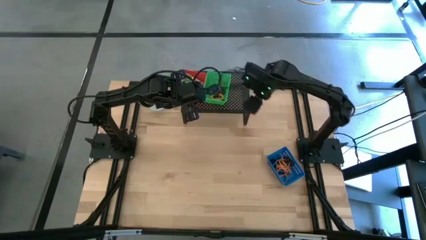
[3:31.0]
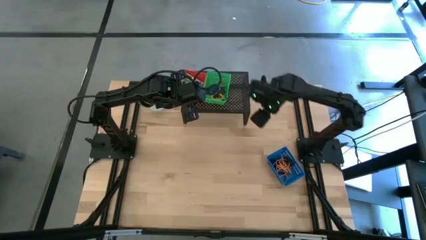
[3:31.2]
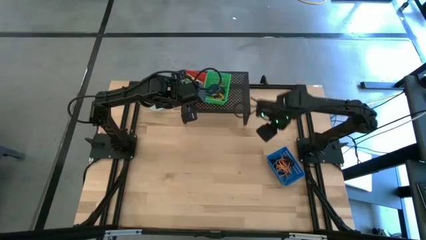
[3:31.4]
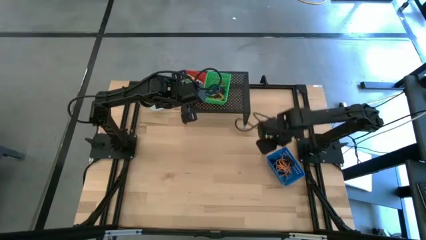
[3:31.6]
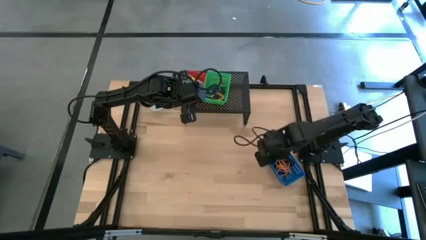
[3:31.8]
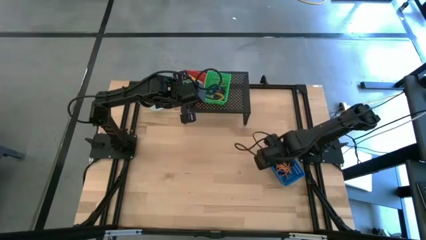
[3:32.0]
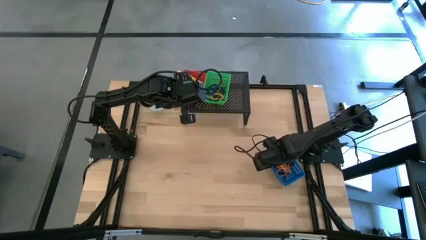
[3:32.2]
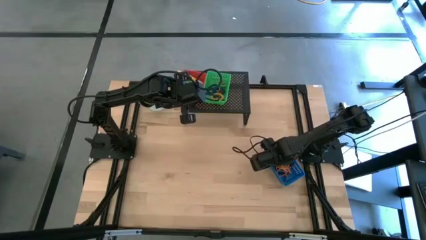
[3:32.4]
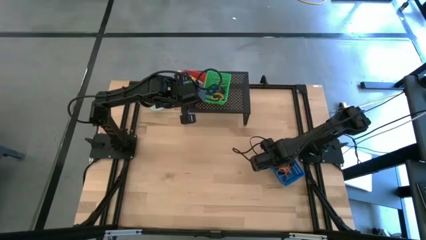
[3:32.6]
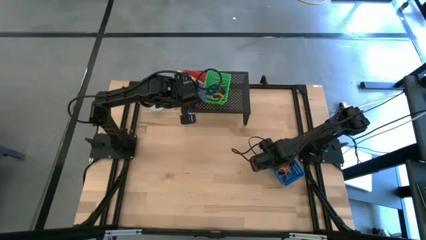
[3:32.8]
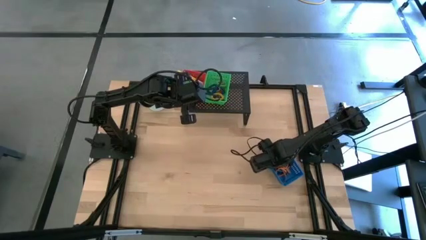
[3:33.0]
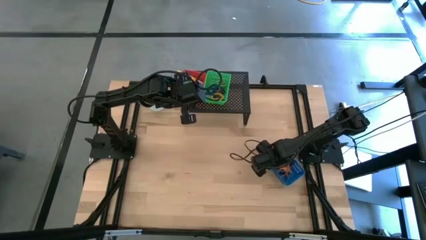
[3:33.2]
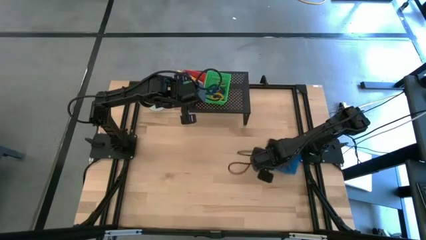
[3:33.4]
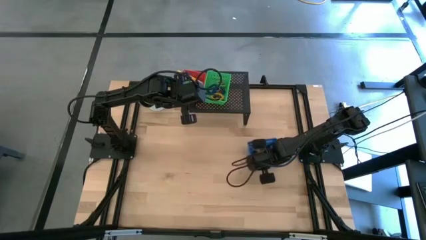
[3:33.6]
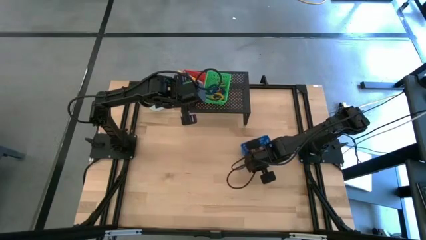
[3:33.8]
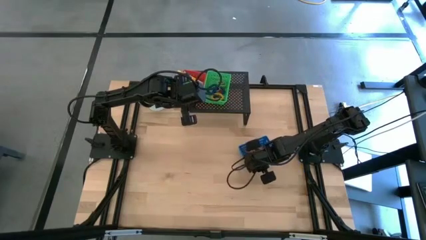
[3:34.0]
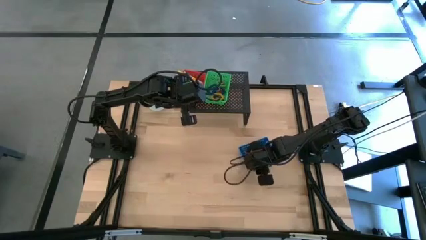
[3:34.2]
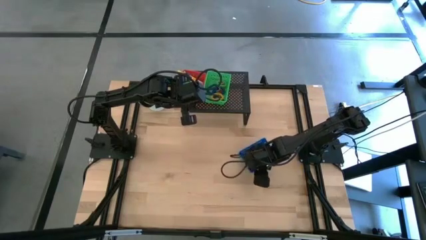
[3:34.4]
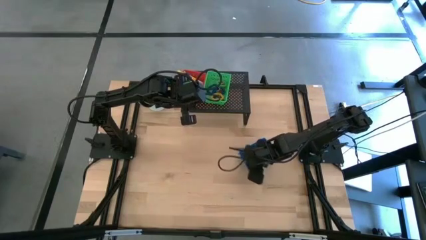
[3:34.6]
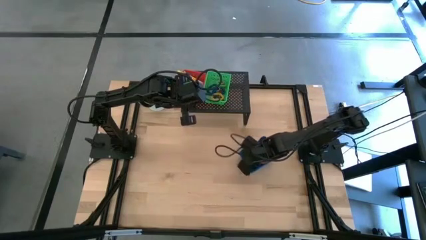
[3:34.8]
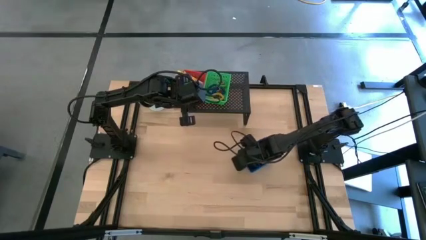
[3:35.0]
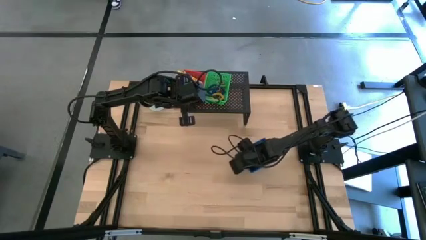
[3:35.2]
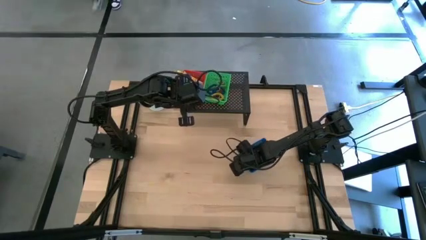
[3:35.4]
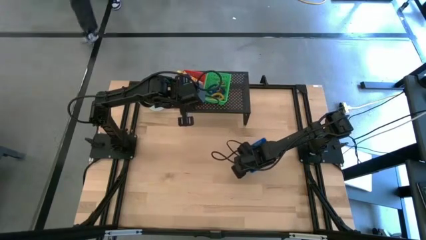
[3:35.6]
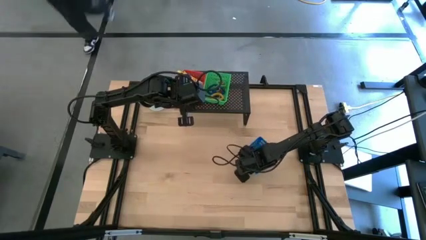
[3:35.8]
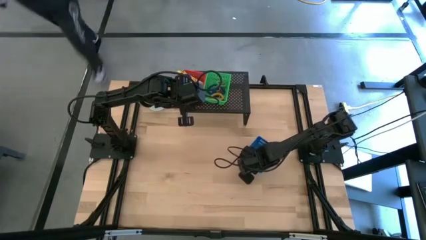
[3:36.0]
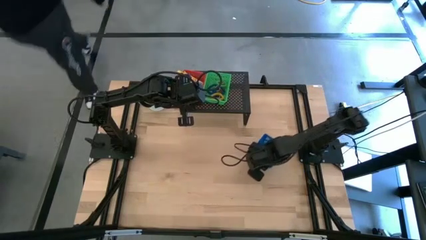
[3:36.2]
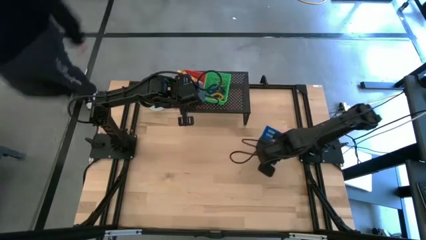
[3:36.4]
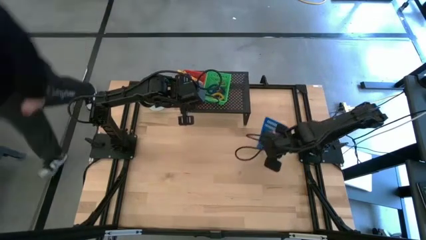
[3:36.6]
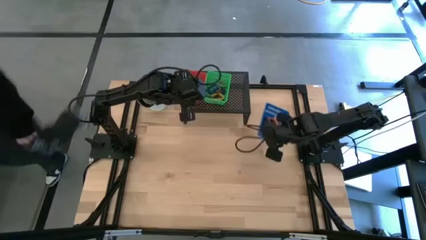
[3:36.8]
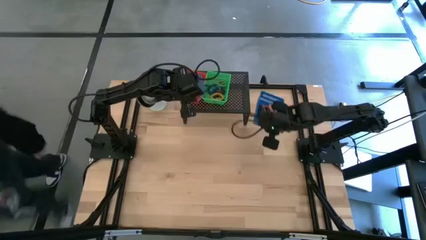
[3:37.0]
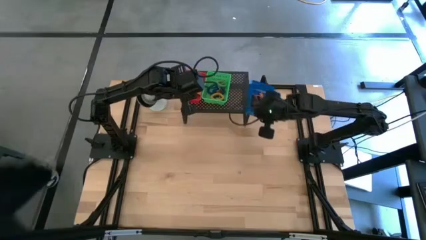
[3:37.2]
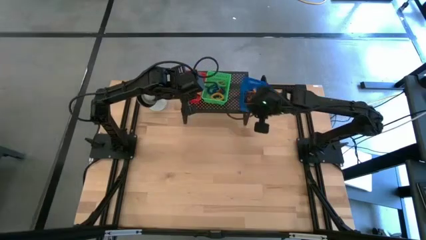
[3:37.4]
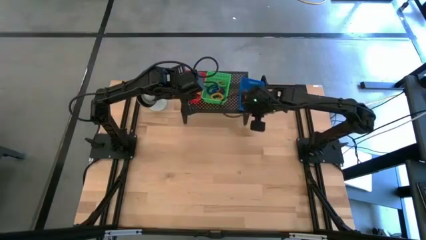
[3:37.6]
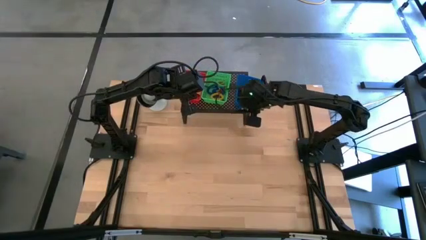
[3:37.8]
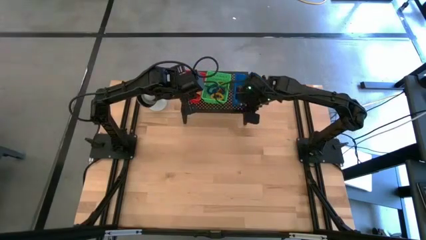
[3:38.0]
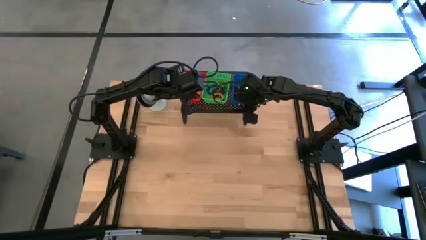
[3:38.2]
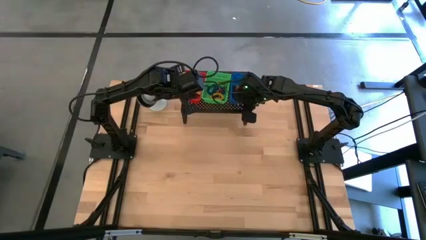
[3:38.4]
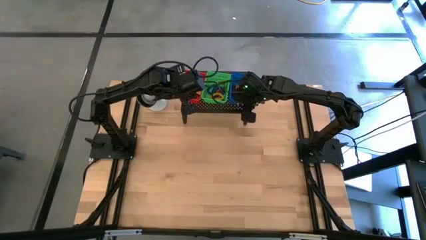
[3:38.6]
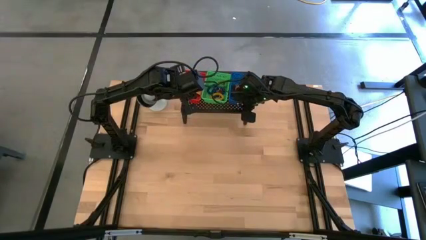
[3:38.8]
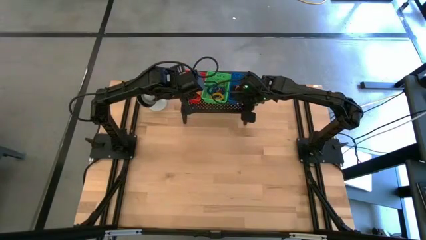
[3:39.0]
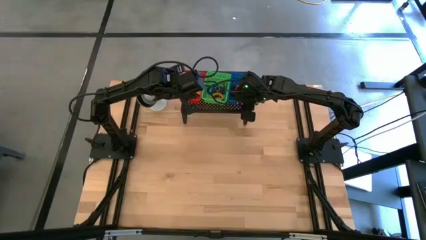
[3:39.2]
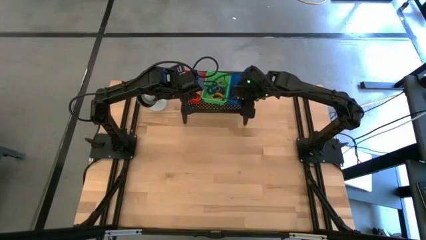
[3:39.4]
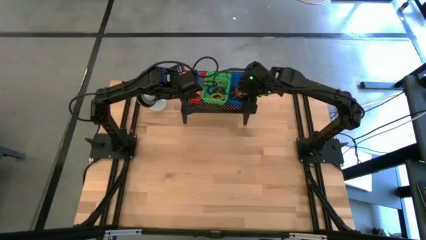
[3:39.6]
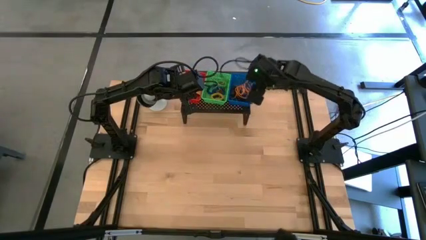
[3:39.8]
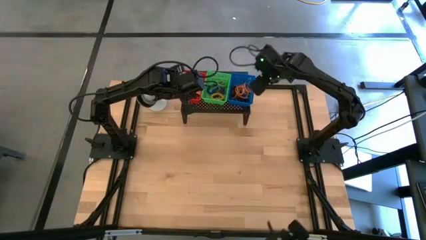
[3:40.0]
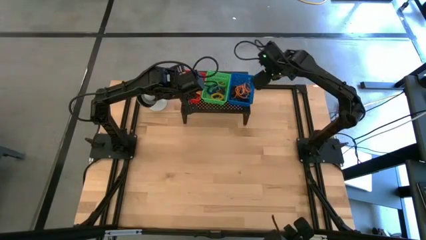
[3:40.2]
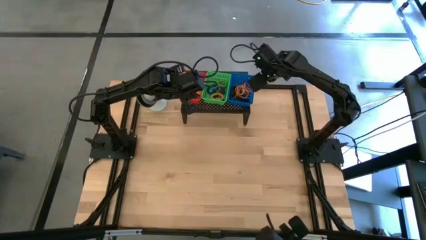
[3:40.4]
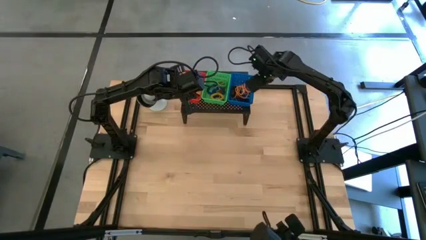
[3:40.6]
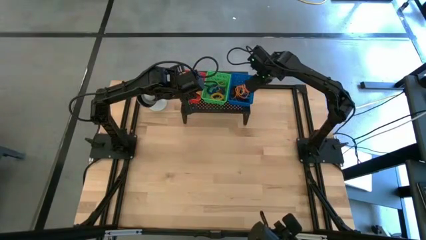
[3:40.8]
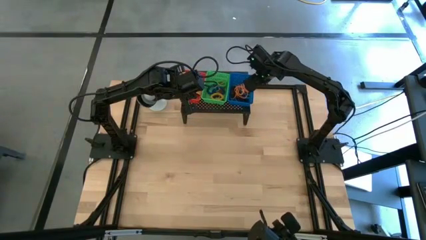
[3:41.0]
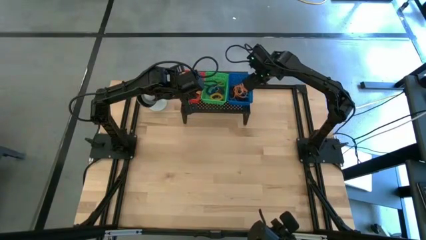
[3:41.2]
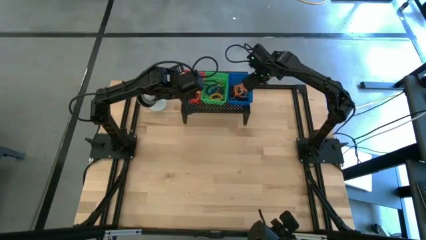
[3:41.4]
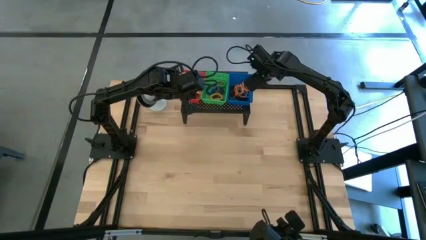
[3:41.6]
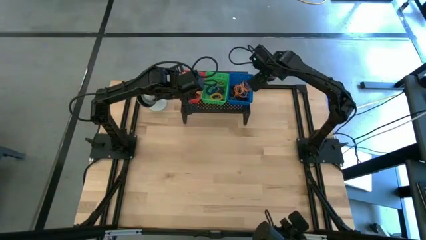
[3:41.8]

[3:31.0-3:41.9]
Task: Pick & Place Office Desk Supplies
Put the blue bin on the shelf

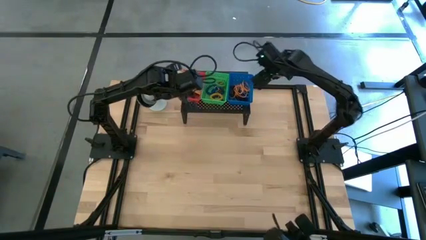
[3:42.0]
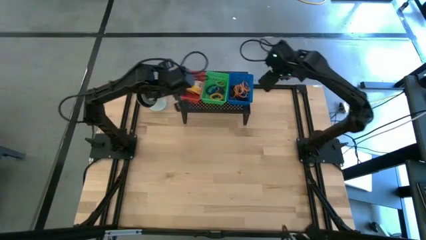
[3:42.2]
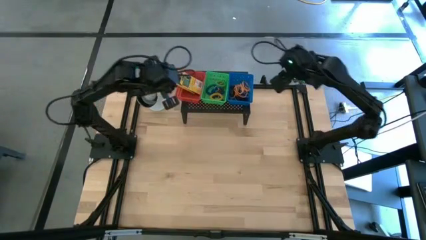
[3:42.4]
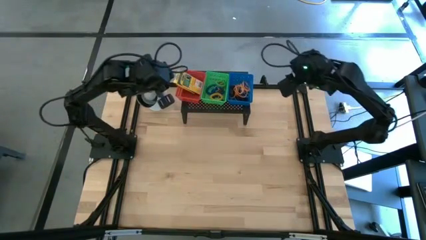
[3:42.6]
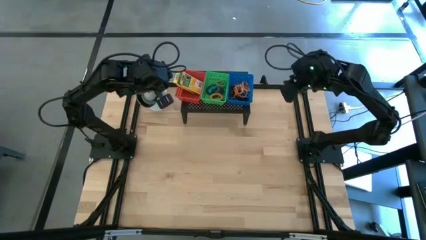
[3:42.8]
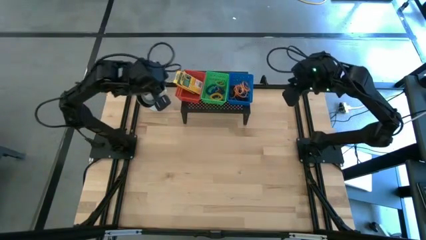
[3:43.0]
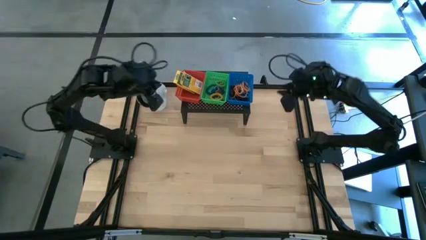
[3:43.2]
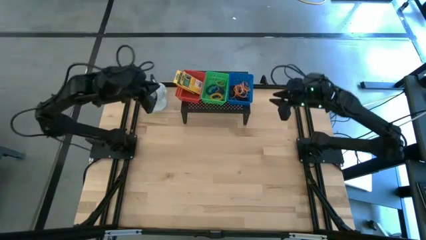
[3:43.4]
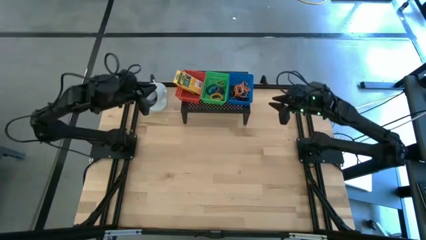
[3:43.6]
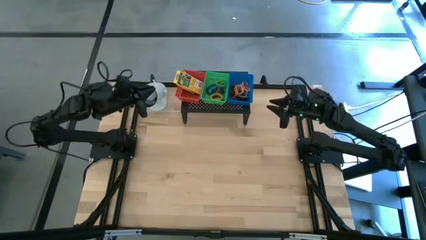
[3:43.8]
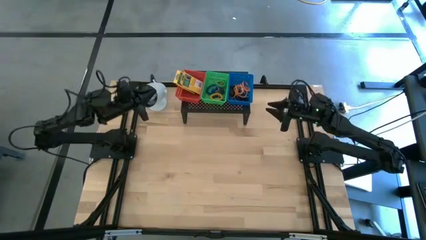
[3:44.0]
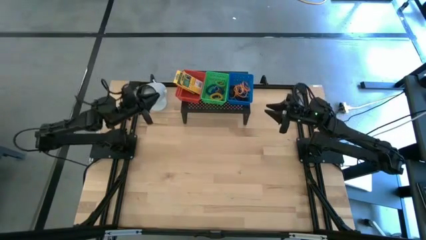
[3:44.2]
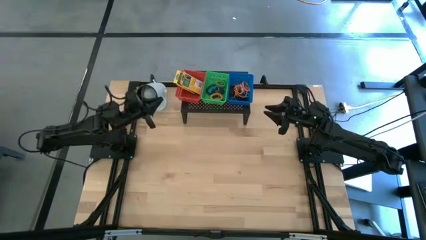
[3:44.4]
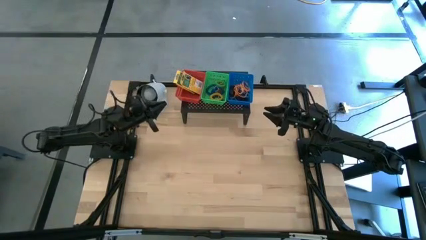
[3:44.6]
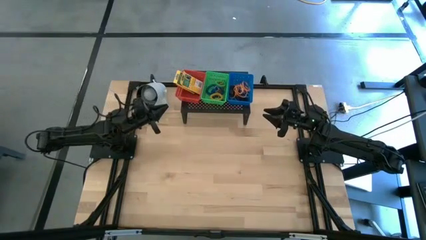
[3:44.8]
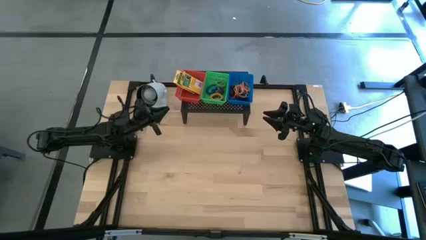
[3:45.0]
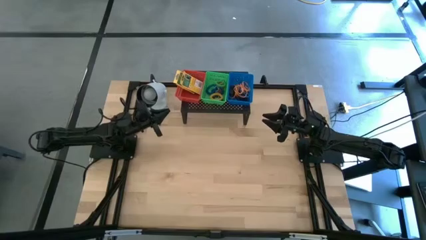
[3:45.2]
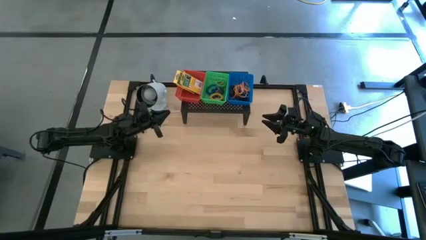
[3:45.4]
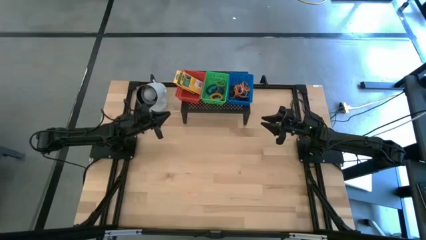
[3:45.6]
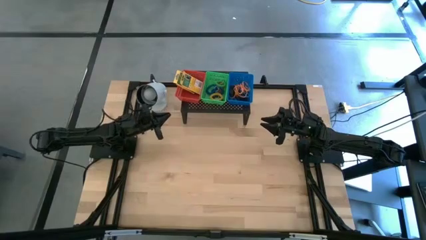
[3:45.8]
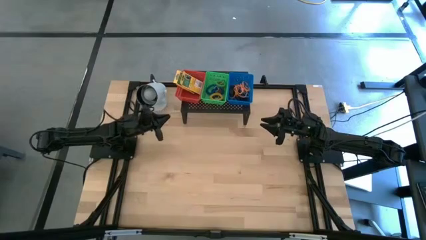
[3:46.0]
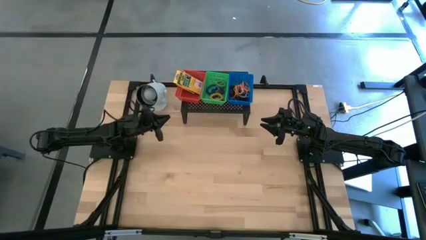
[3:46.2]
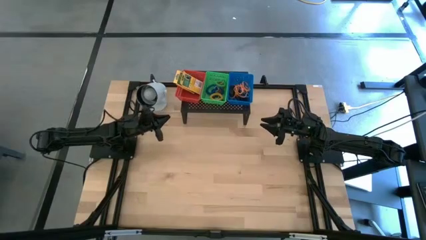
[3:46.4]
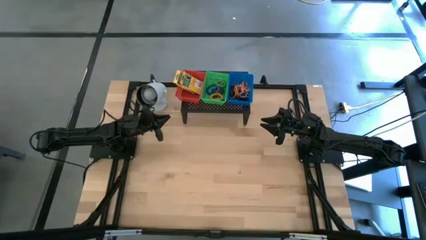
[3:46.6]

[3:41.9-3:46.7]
Return to Home Position
